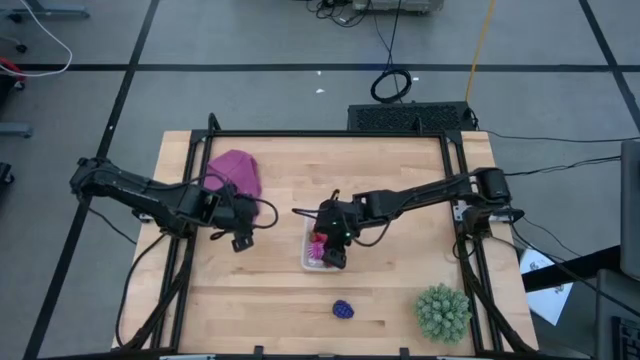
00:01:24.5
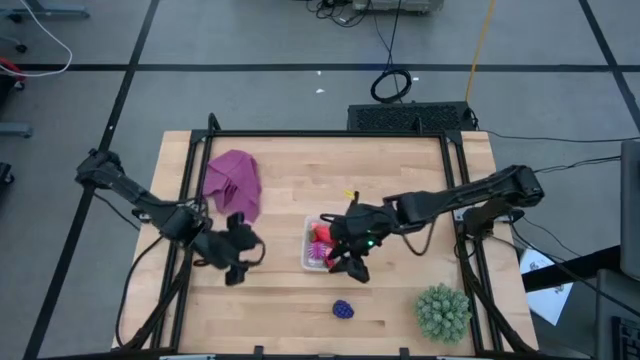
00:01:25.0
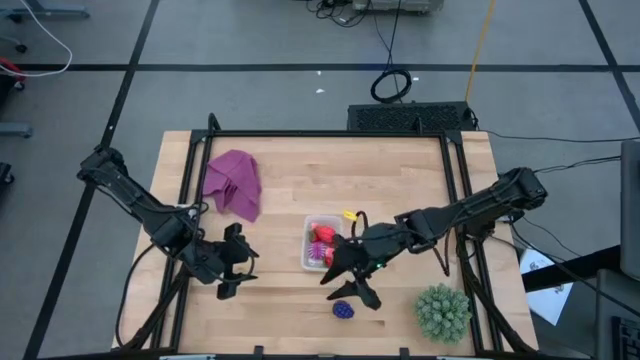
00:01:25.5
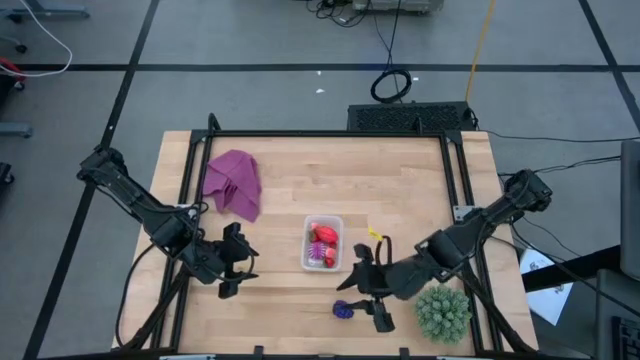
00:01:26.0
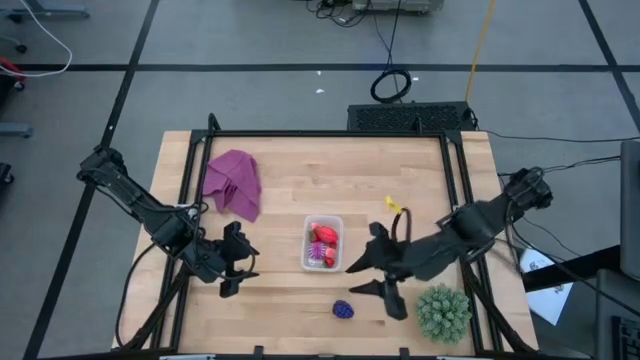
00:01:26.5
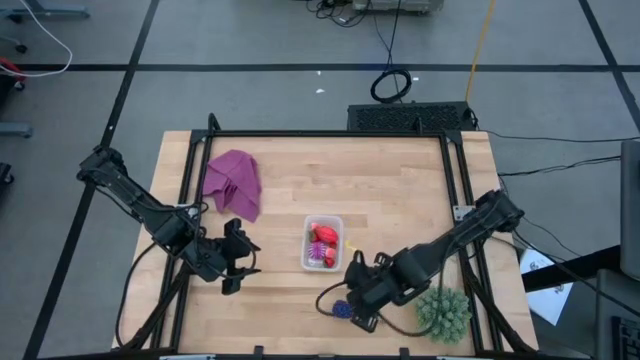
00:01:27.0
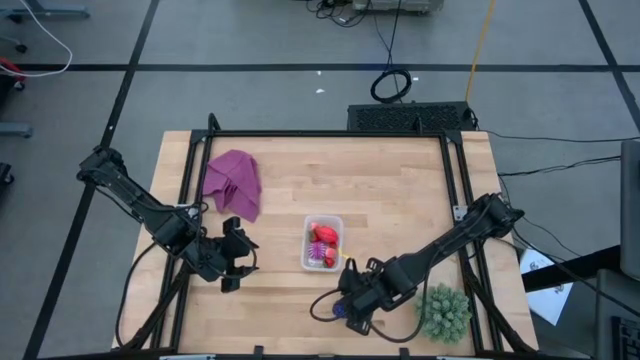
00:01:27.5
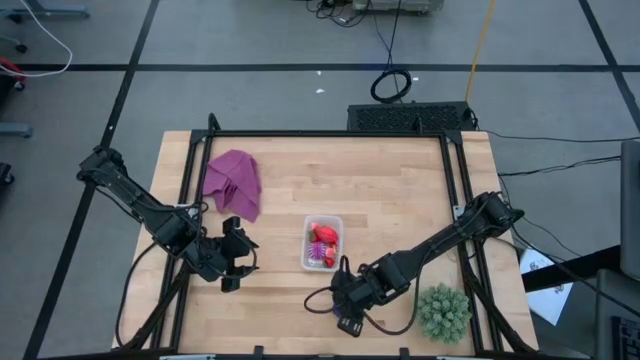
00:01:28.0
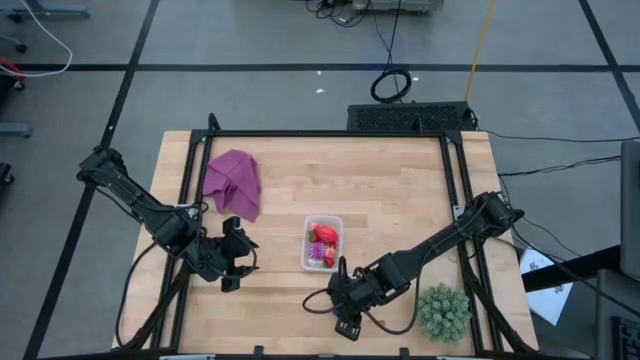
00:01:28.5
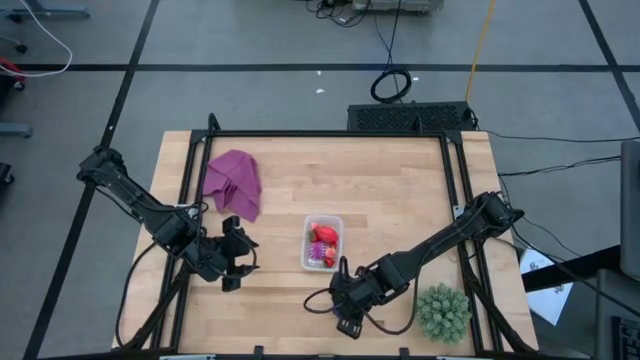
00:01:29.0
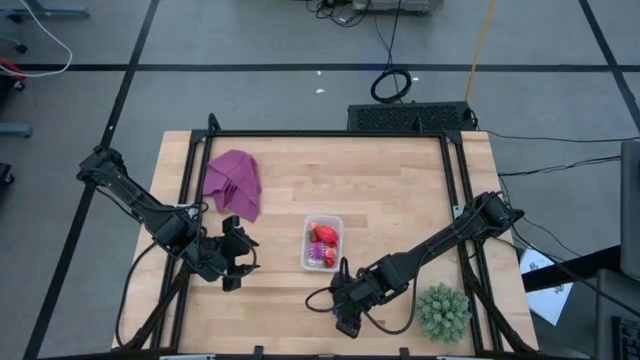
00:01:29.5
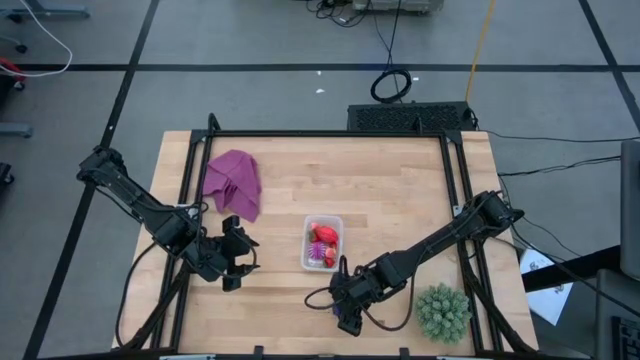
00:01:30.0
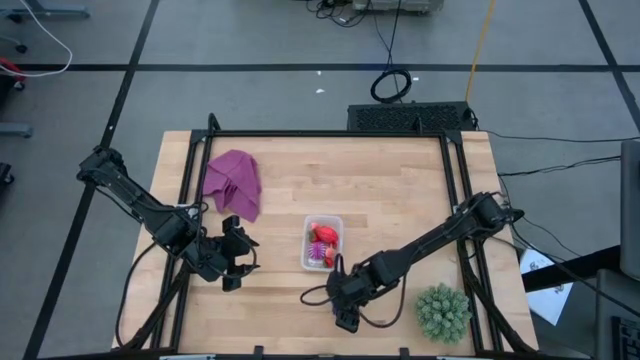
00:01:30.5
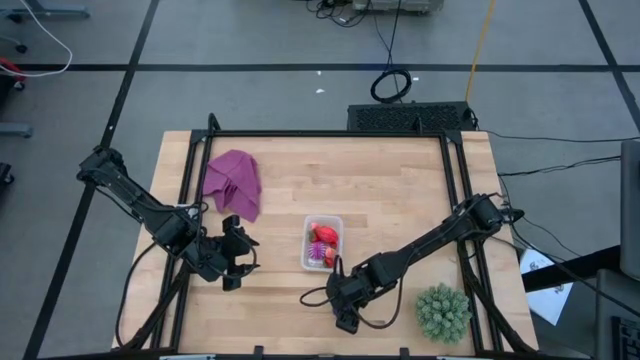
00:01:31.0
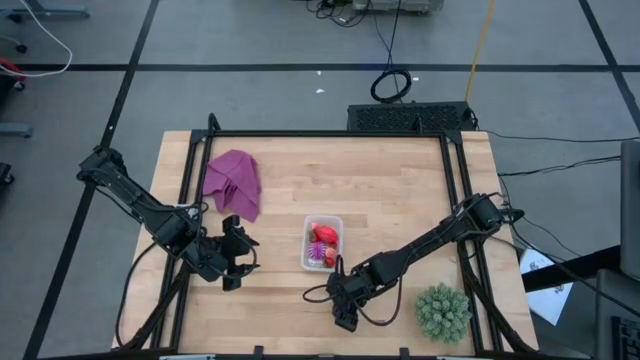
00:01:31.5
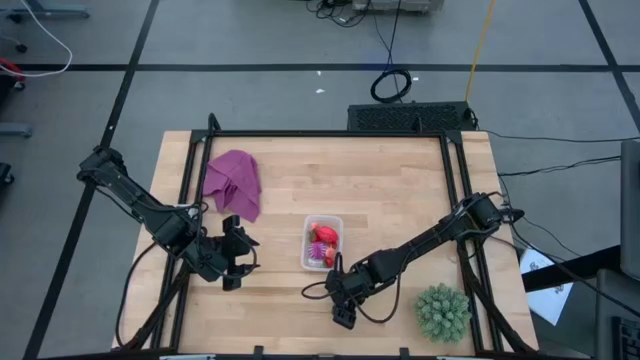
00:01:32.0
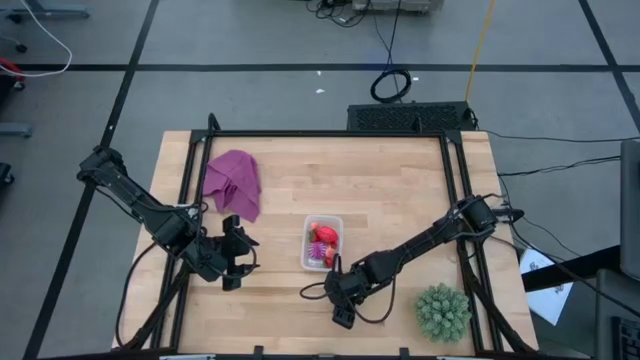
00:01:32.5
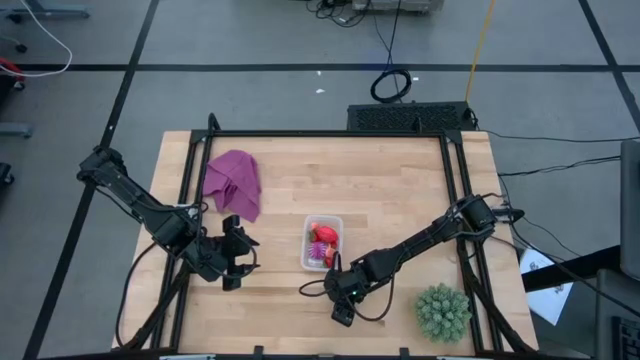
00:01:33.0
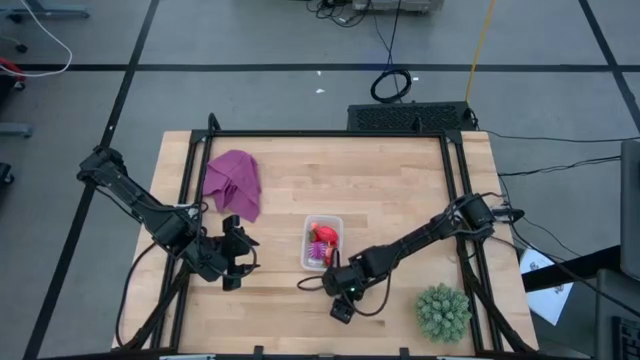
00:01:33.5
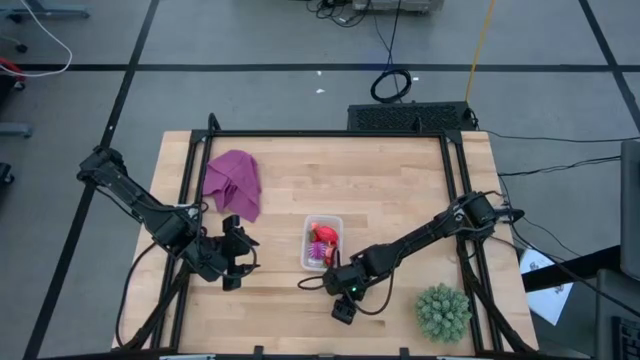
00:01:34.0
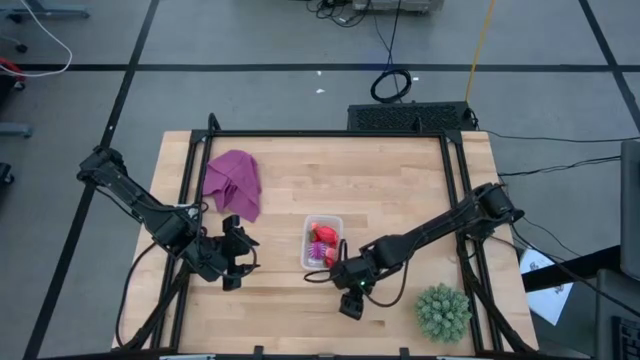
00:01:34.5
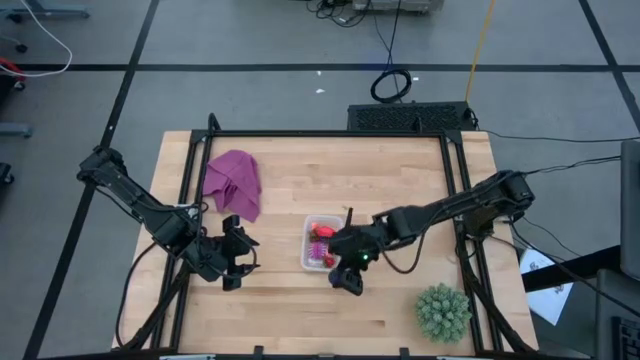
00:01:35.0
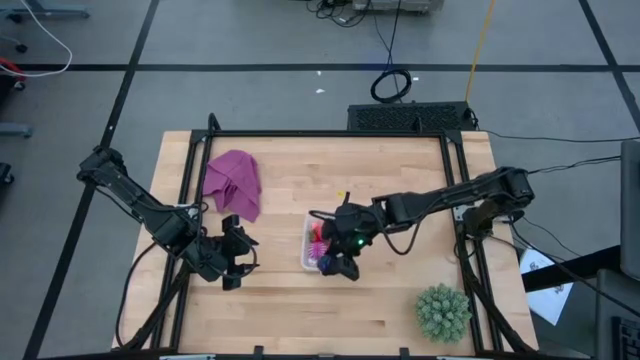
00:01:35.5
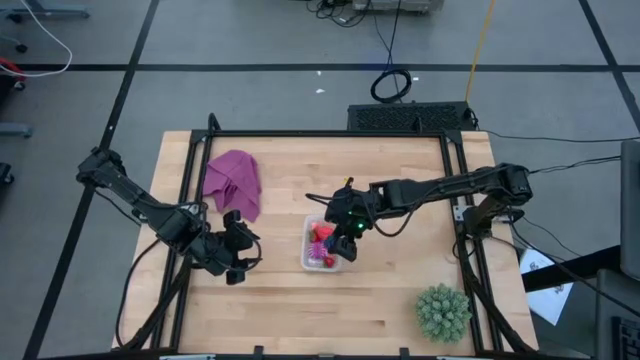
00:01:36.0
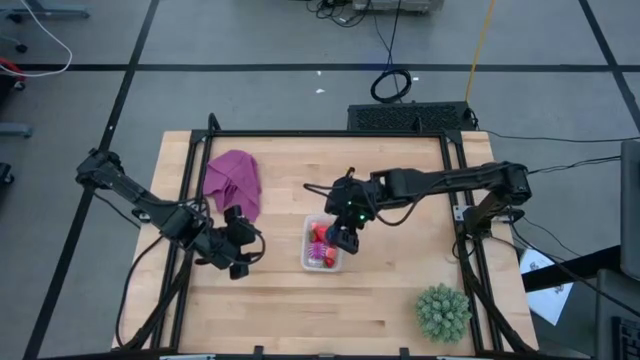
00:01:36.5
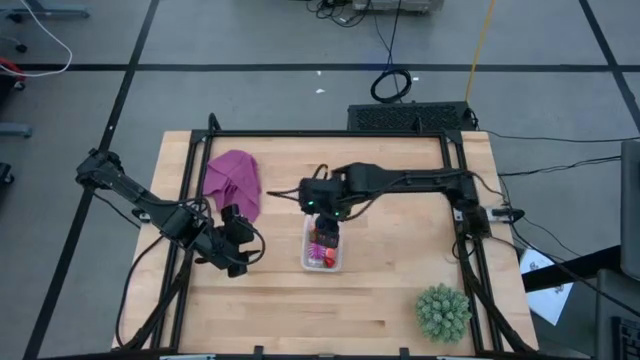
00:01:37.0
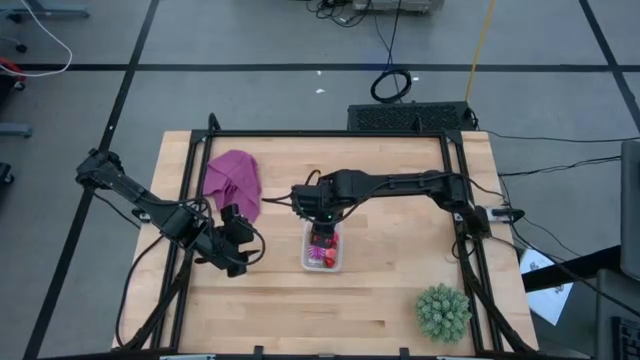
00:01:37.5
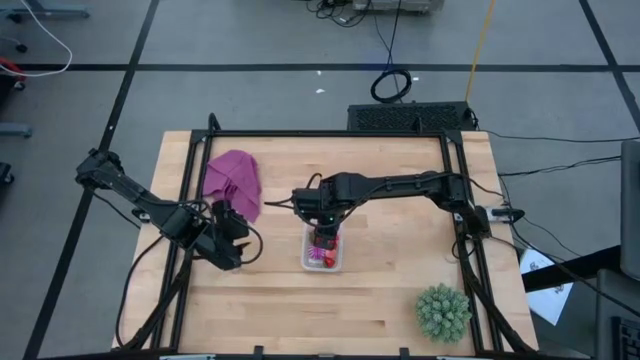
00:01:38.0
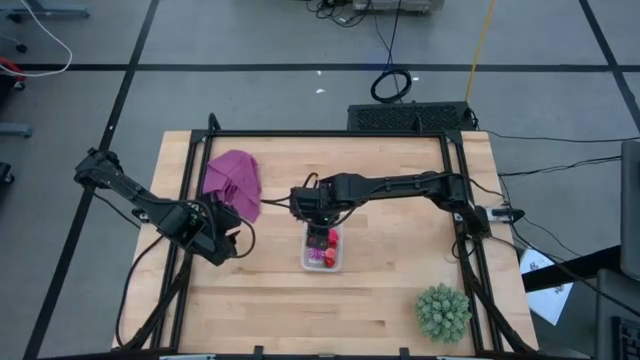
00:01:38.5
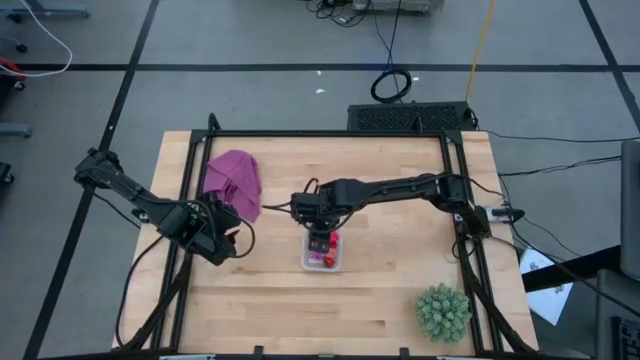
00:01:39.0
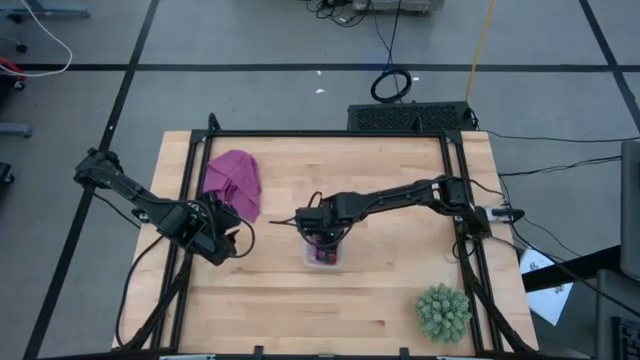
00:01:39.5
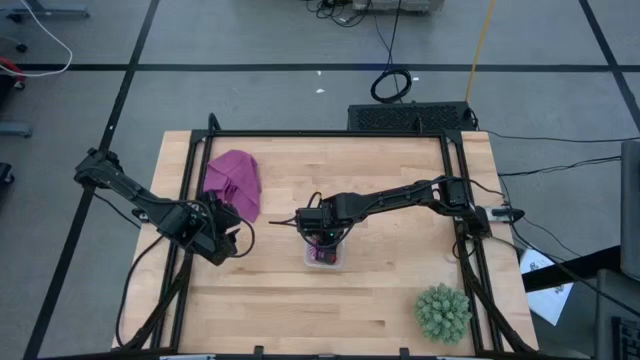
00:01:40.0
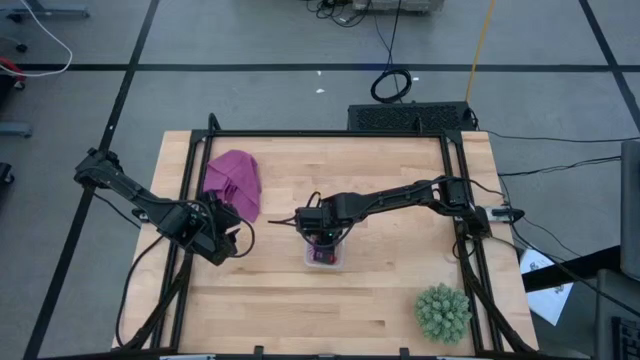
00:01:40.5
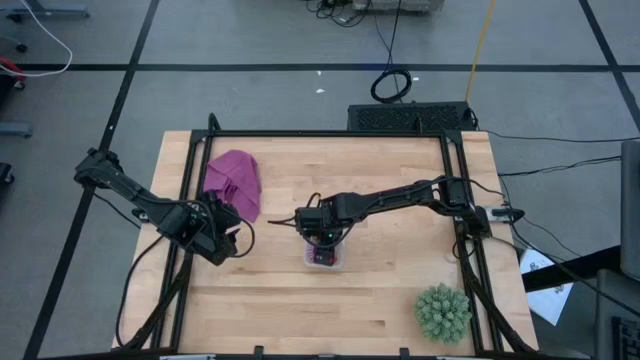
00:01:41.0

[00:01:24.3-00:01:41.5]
Task: Pick and placing Produce into tupperware
Put the grapes into the transparent bin

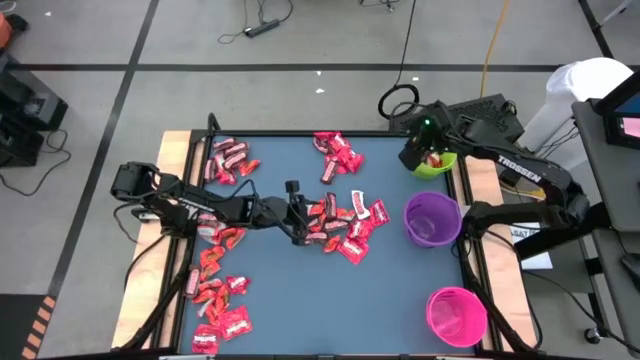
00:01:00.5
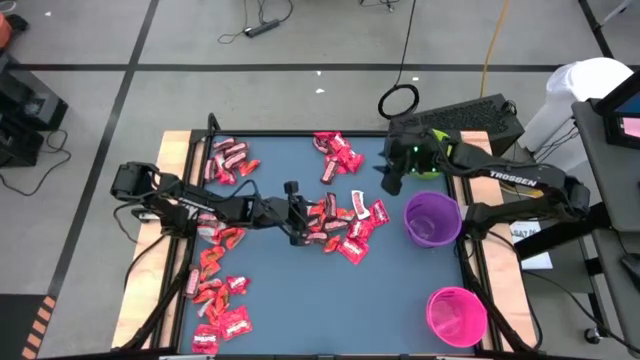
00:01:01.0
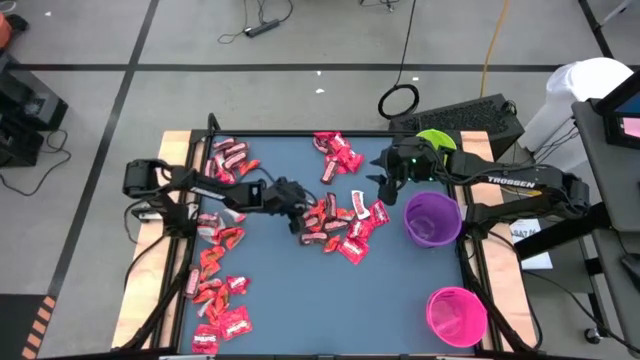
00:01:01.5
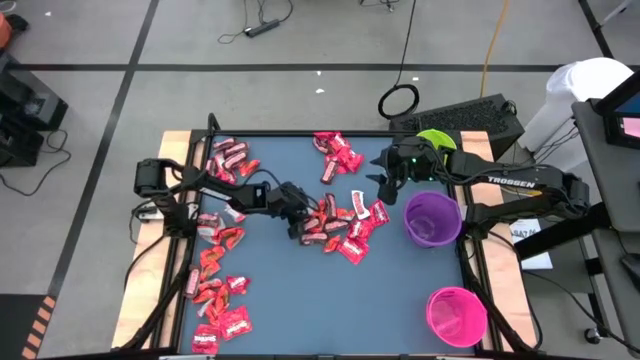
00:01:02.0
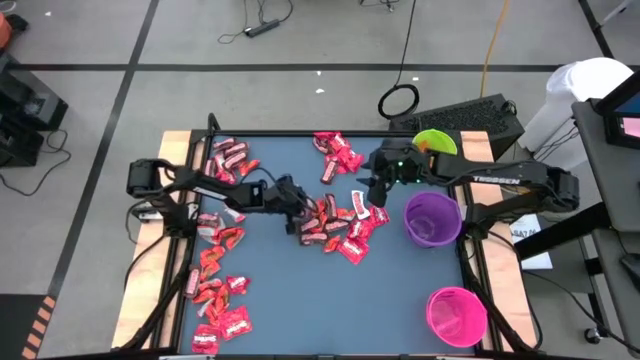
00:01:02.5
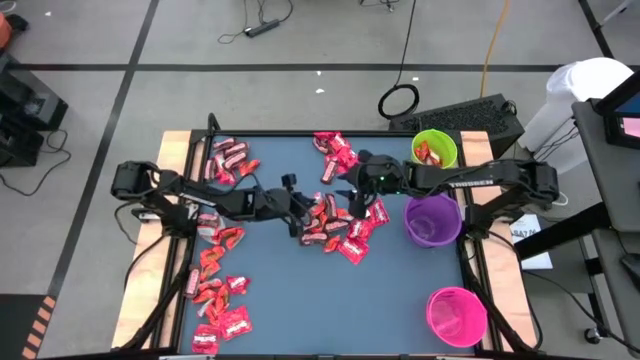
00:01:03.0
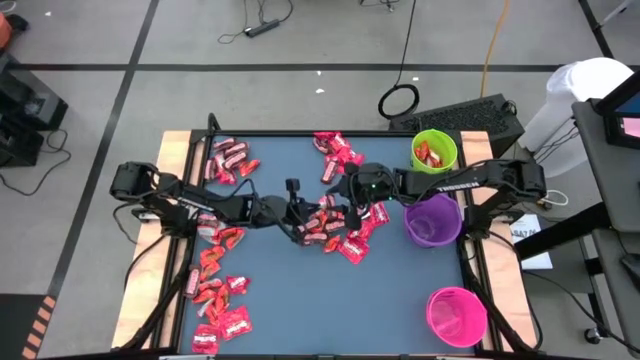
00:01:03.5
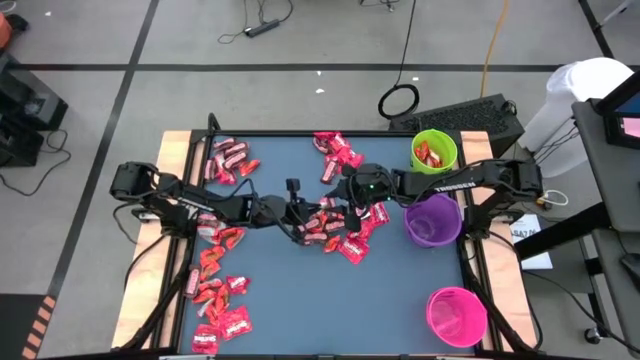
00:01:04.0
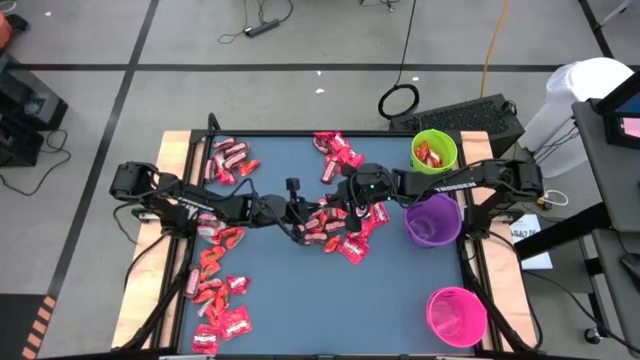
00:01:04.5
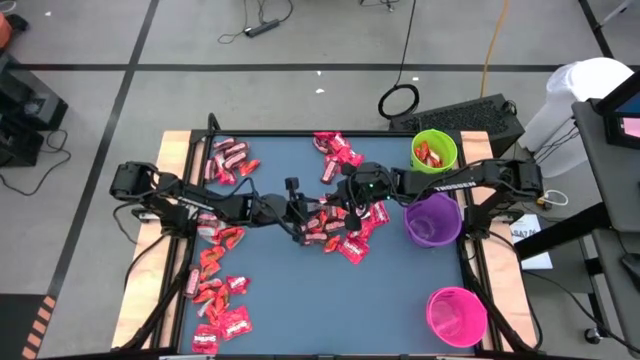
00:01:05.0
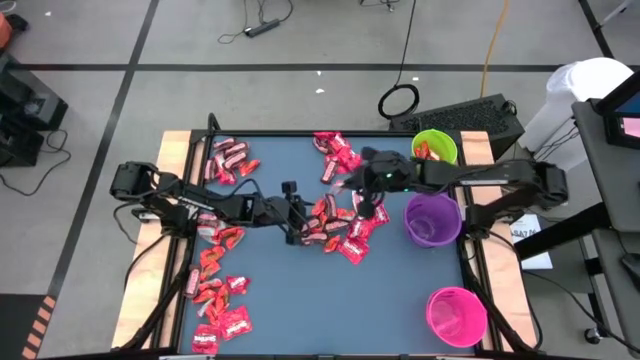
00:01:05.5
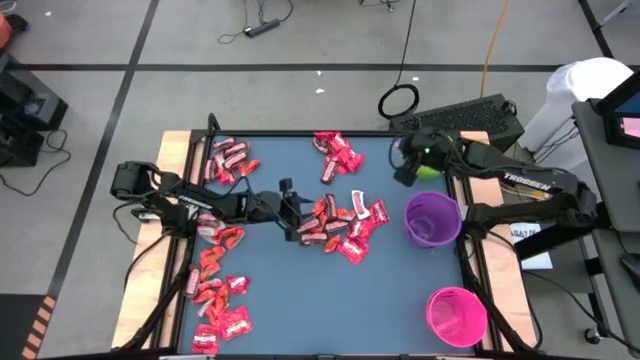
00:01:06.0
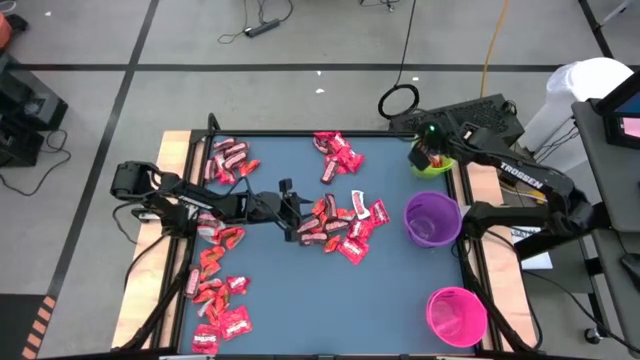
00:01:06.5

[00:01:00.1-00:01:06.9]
Task: Organize candy in baskets
Put the orange chocolate bar into the green bucket
